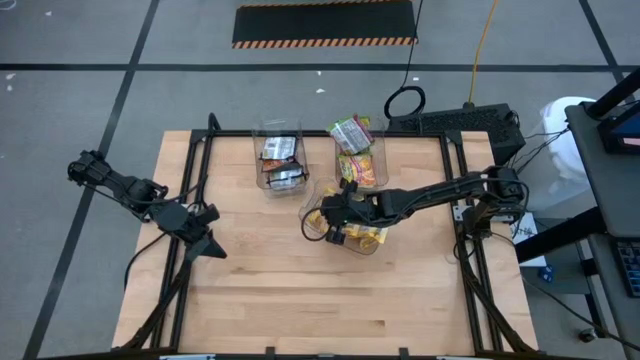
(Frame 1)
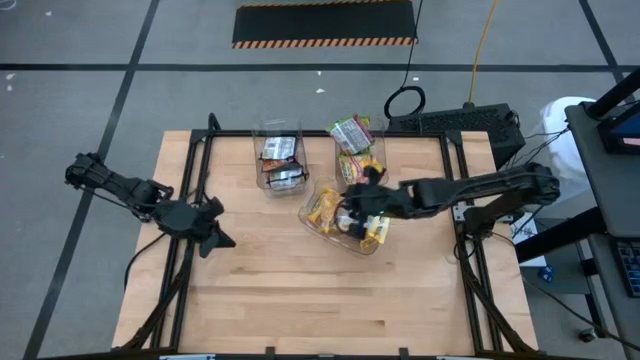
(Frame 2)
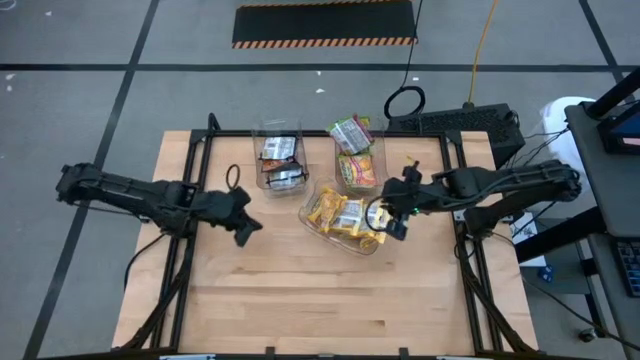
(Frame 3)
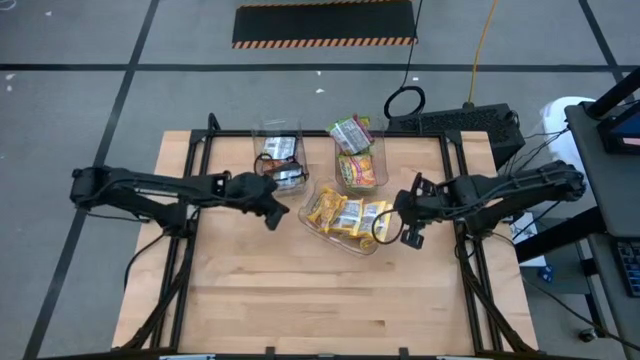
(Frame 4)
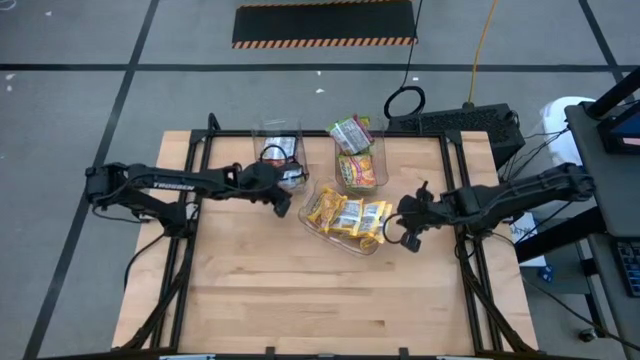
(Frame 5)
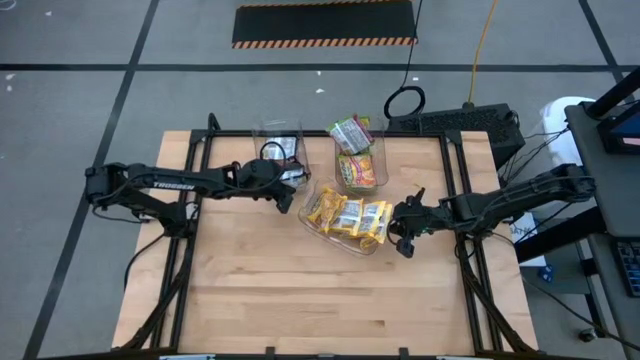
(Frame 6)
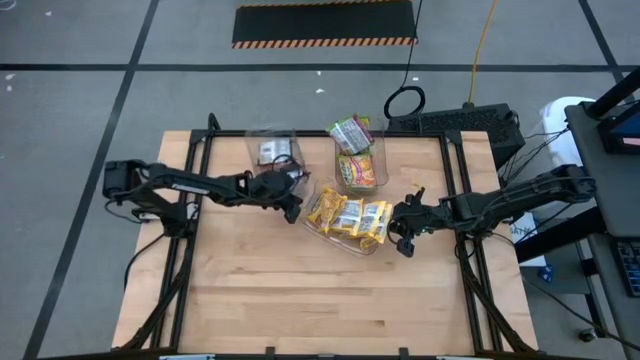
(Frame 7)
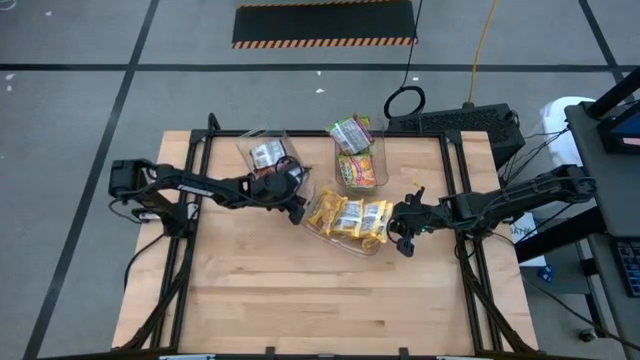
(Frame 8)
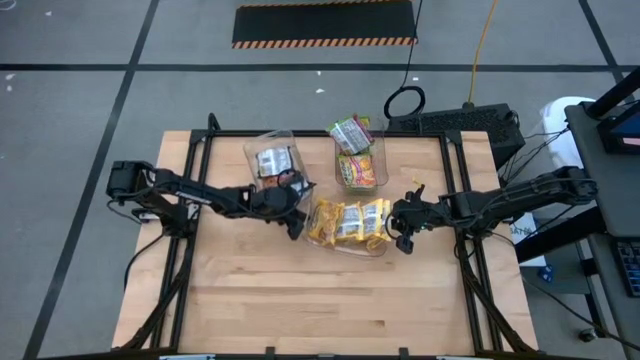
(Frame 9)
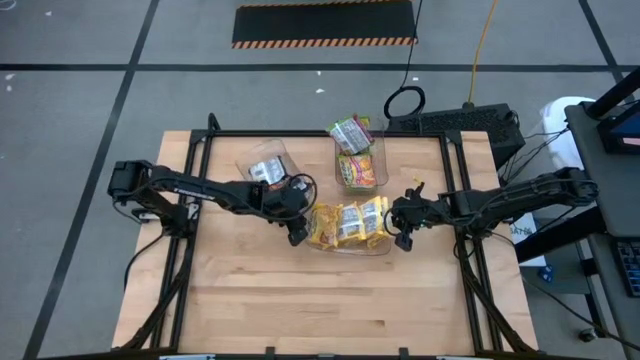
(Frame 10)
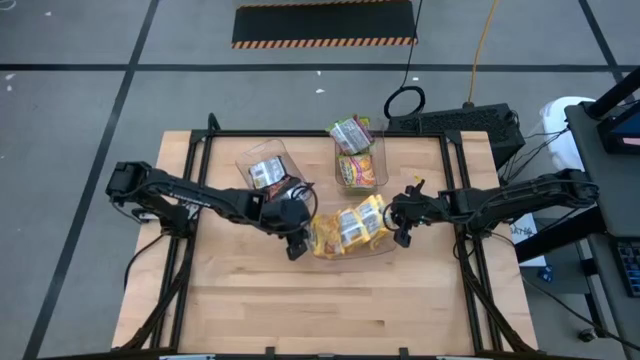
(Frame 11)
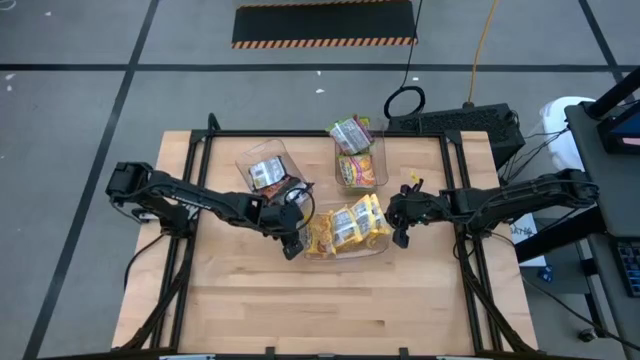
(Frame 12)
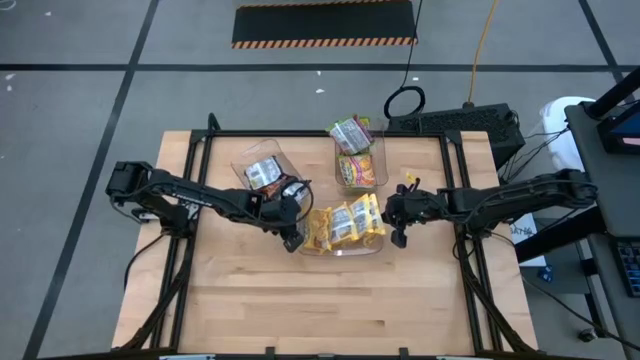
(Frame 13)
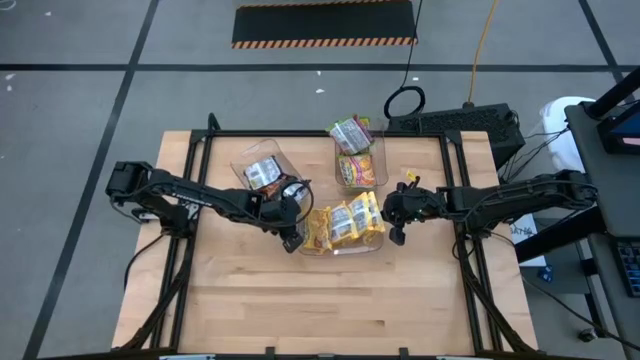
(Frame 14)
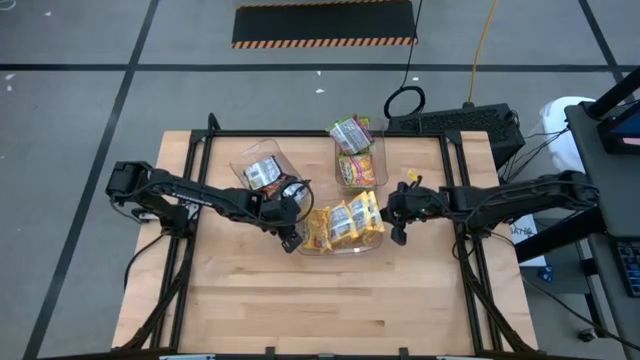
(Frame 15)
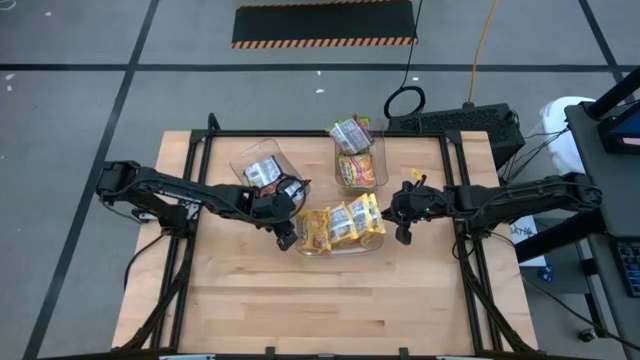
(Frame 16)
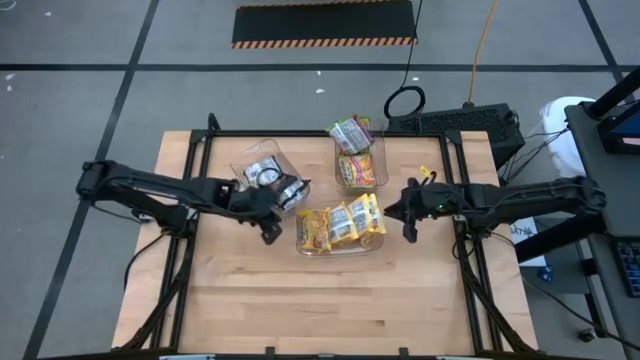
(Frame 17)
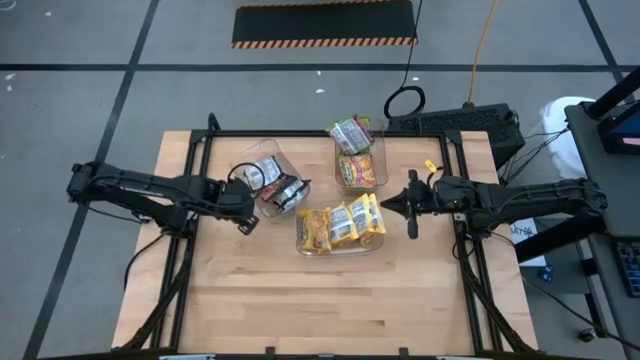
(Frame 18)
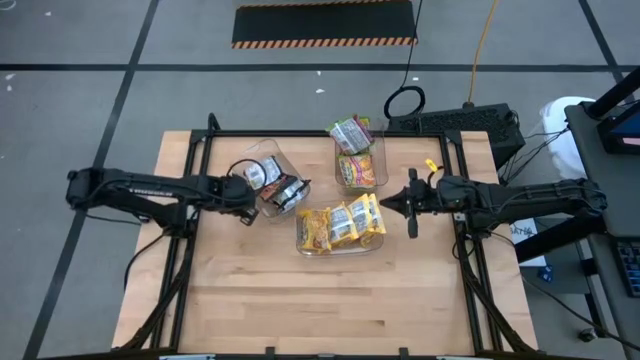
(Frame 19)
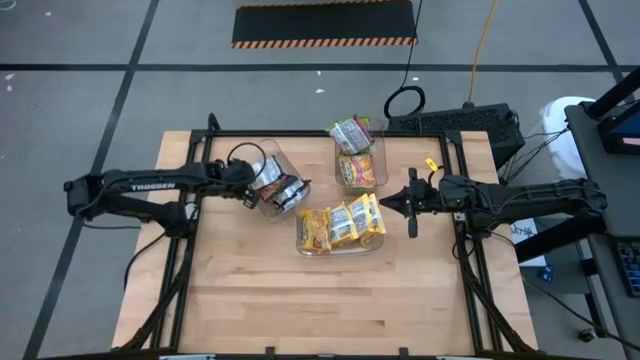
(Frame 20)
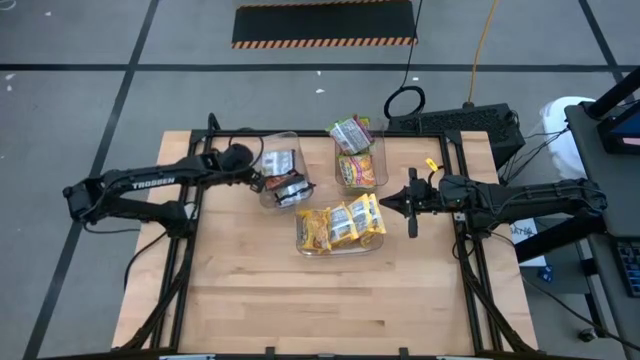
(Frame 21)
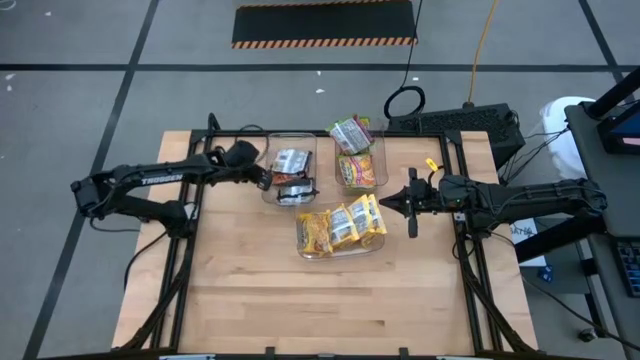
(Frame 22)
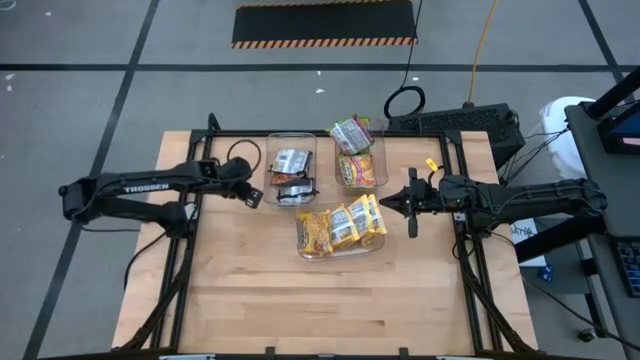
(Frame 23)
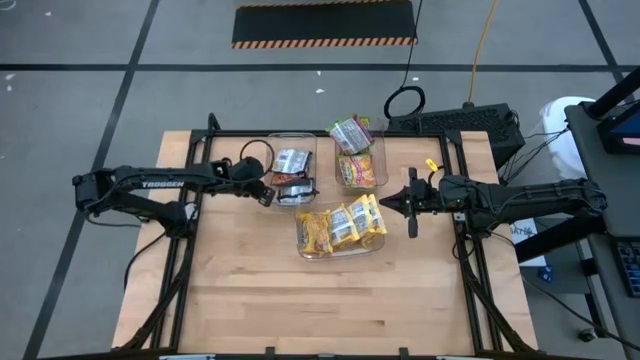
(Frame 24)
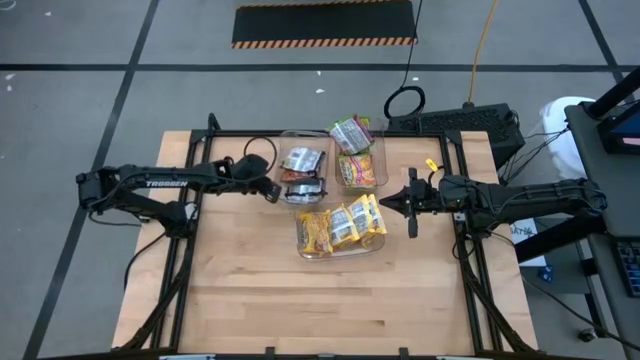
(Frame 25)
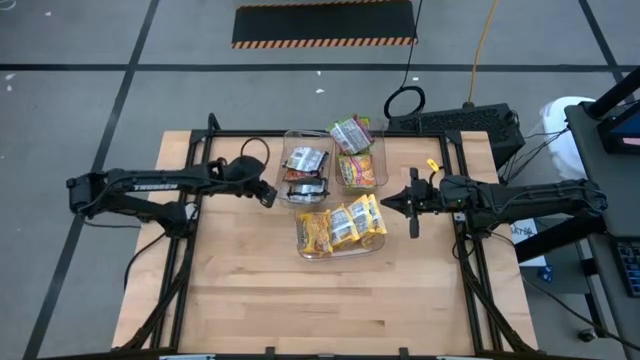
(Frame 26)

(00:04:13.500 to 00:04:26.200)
Task: Sort Maruchan noodles
Adjust the transparent bins

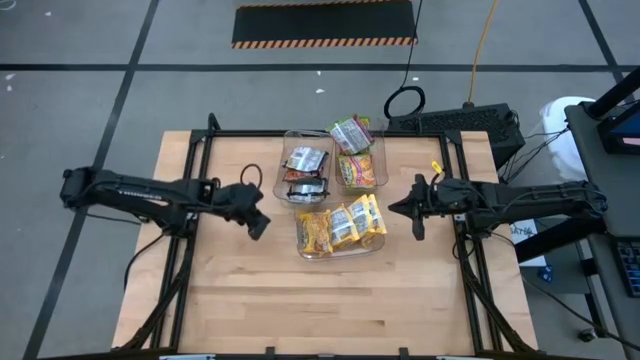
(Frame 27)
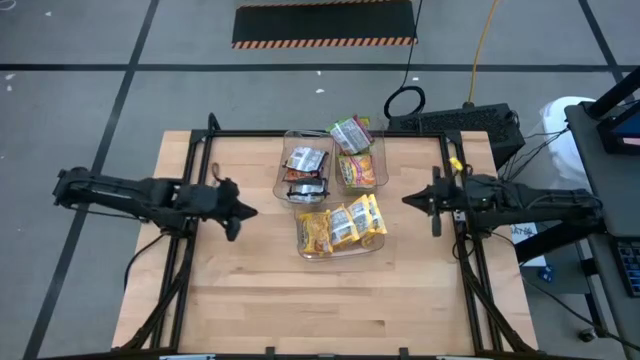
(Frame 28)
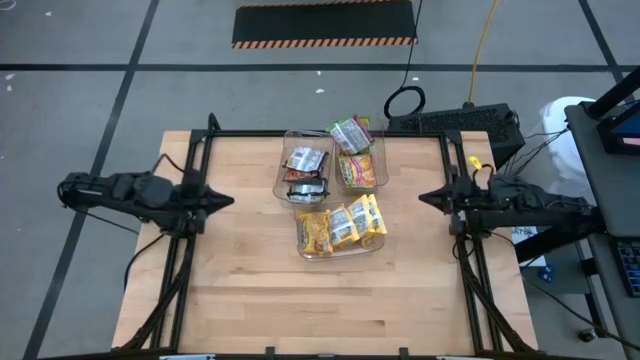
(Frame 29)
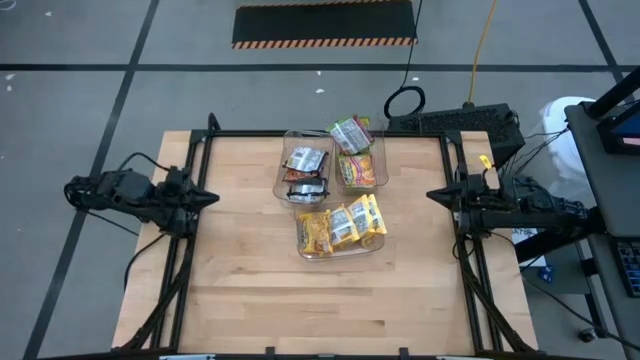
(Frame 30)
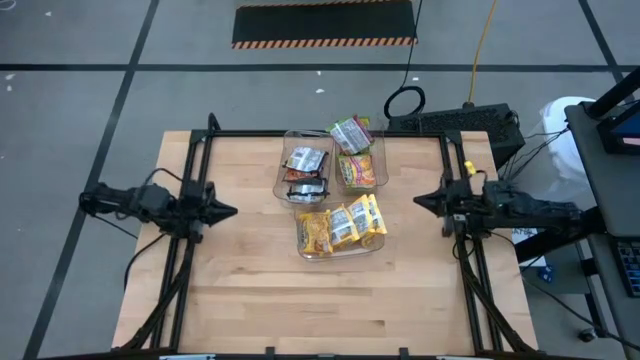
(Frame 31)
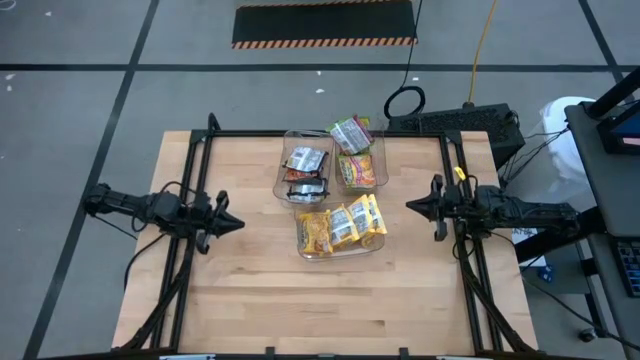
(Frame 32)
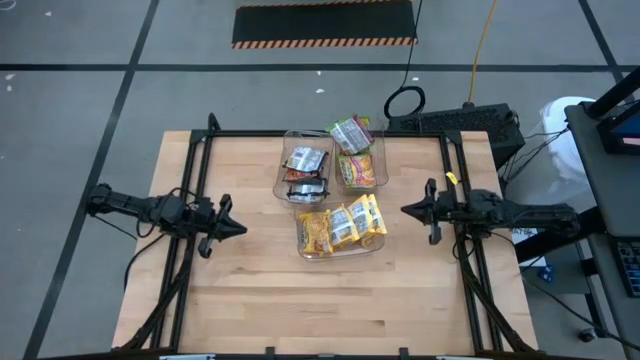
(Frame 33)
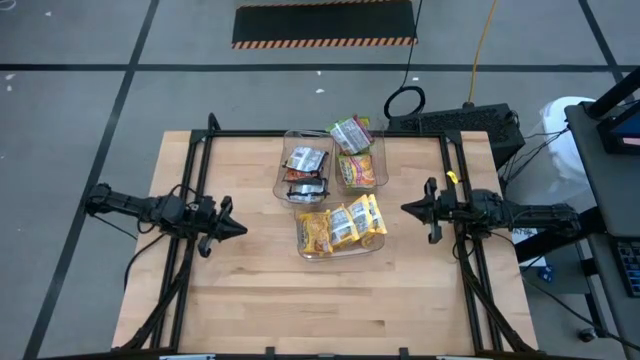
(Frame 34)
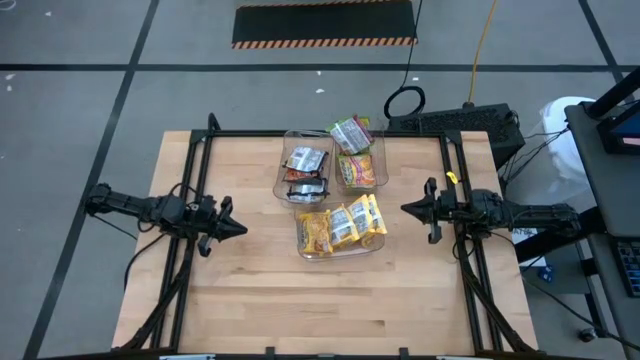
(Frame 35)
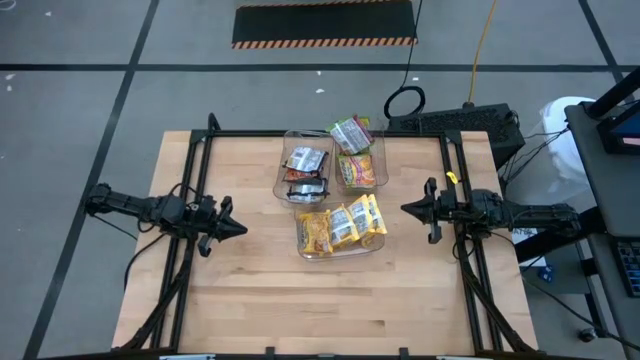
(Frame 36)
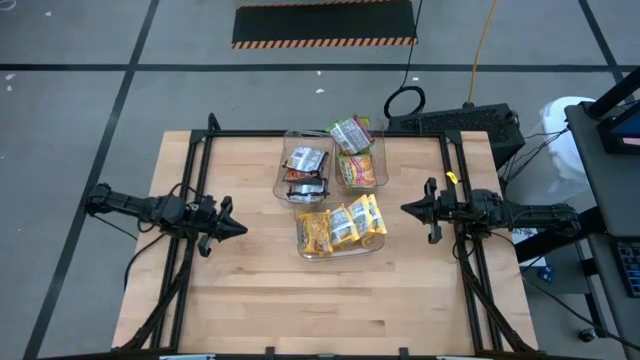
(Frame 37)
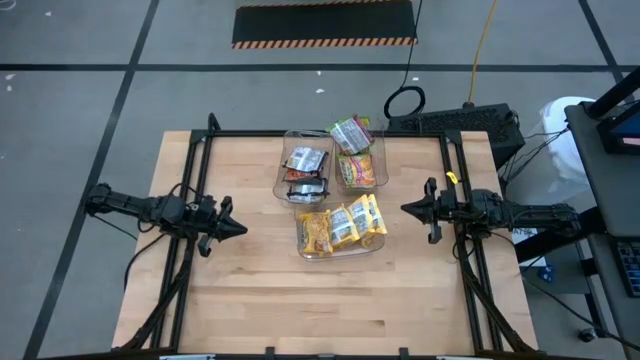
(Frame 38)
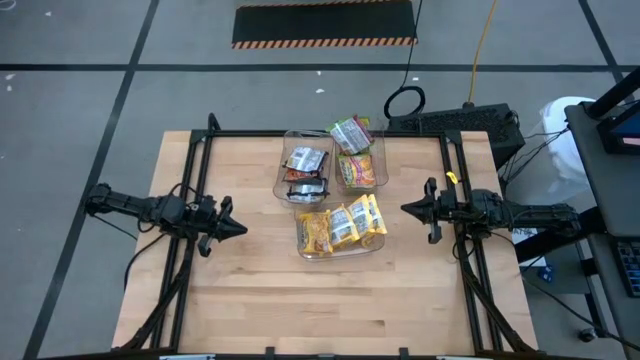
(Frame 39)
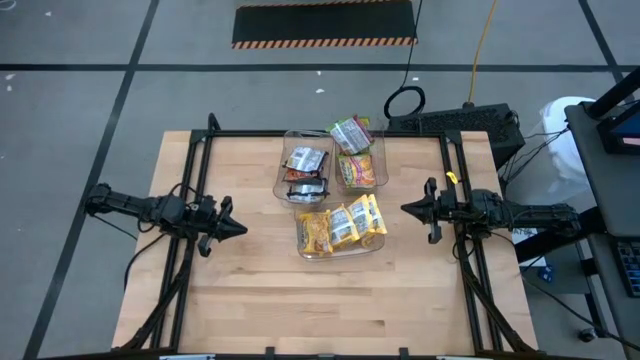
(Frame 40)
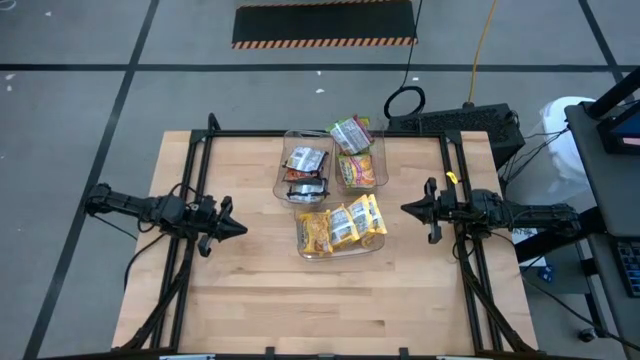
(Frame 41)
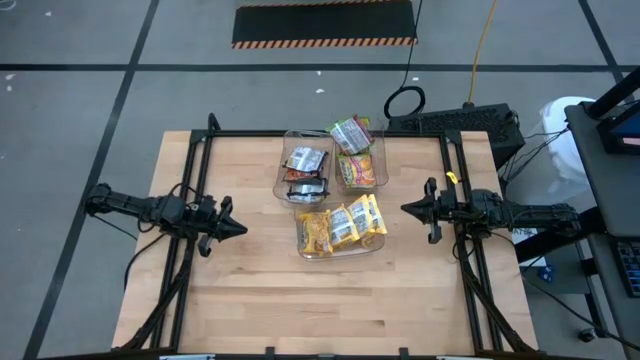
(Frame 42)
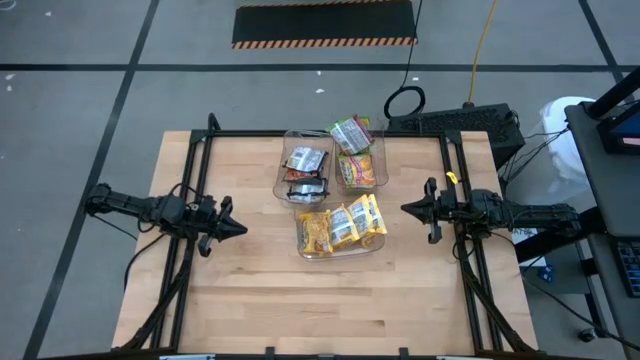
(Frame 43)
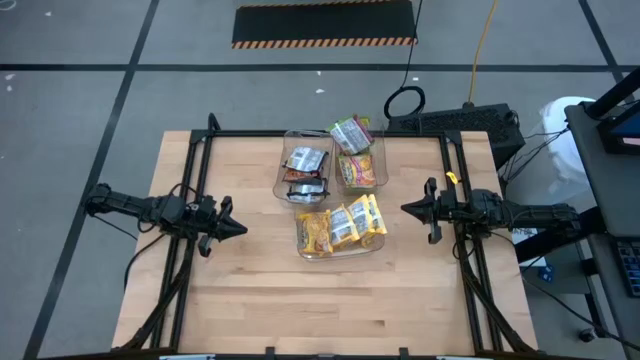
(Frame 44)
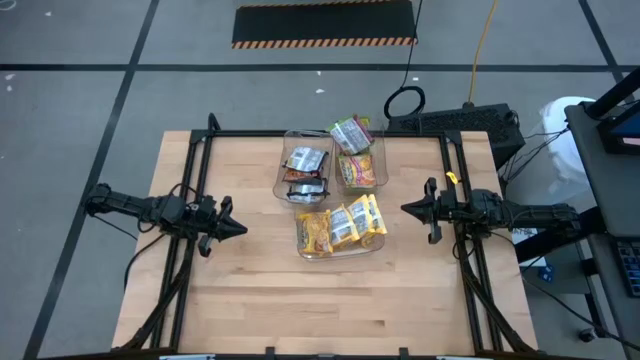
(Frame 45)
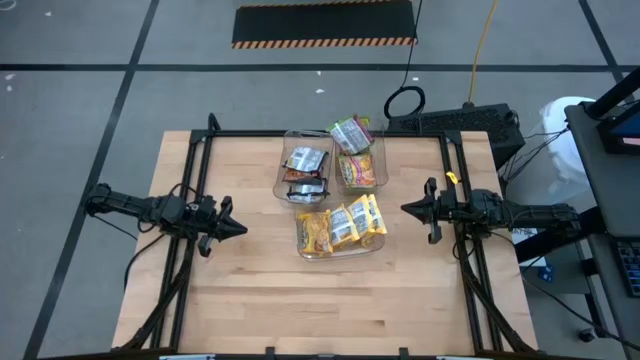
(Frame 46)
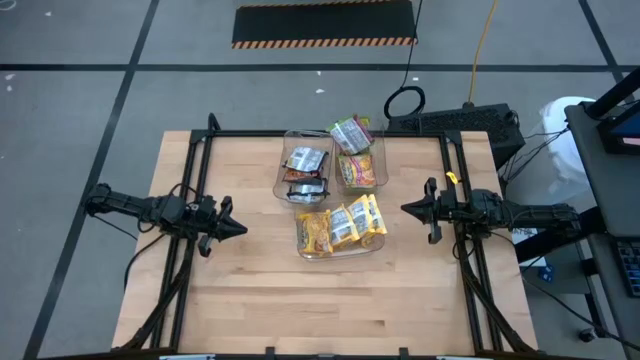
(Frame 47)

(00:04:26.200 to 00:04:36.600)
Return to Home Position
